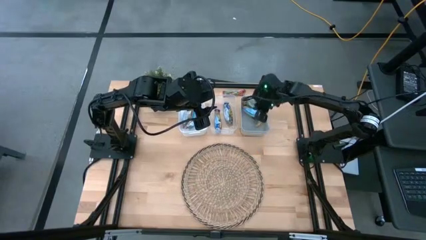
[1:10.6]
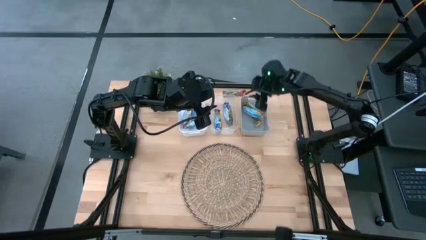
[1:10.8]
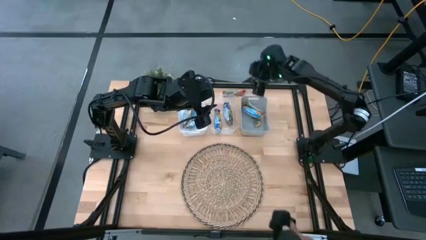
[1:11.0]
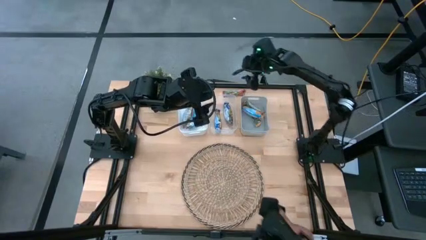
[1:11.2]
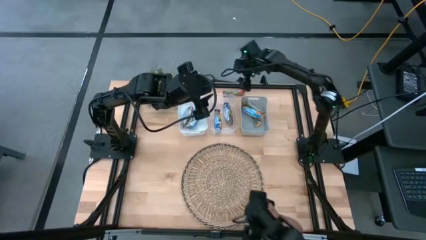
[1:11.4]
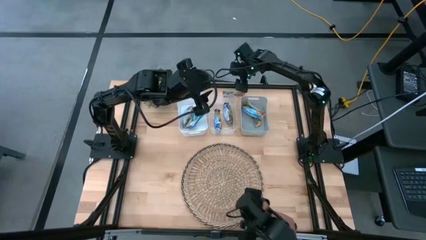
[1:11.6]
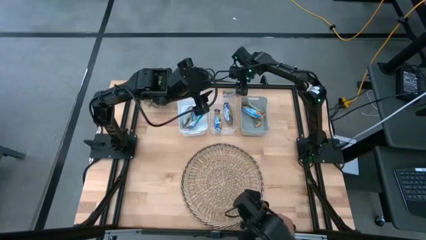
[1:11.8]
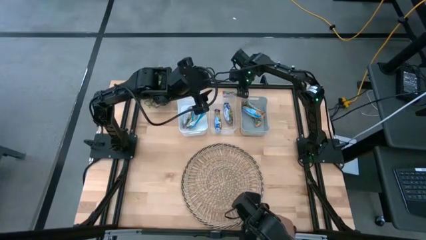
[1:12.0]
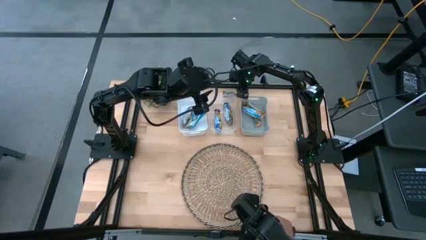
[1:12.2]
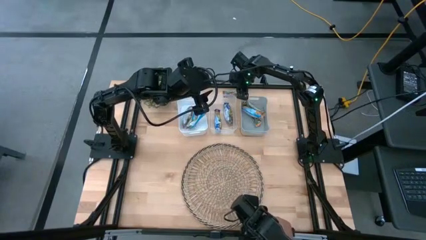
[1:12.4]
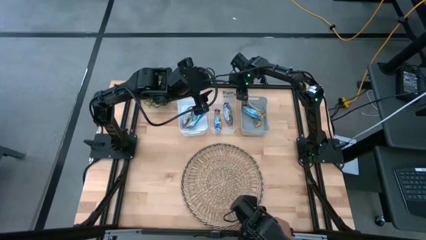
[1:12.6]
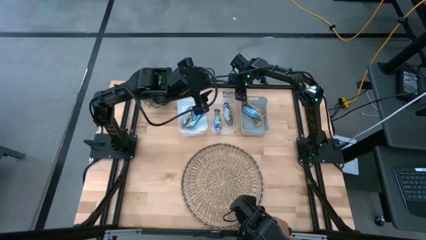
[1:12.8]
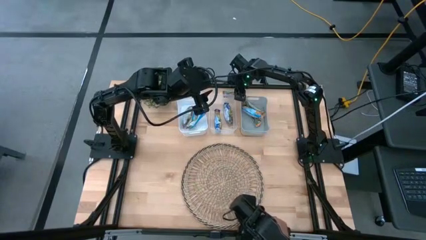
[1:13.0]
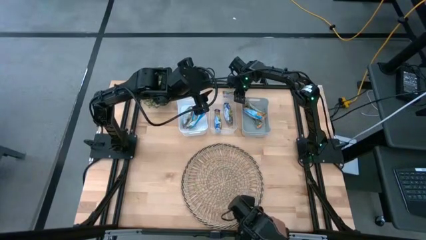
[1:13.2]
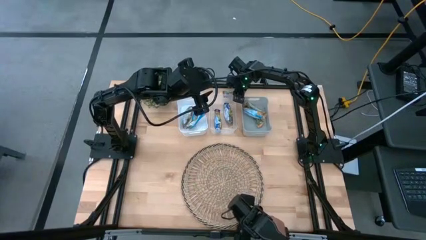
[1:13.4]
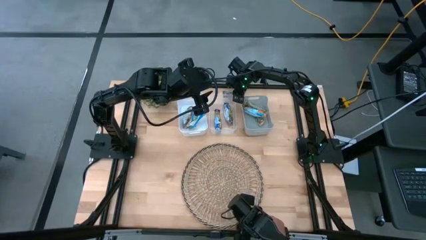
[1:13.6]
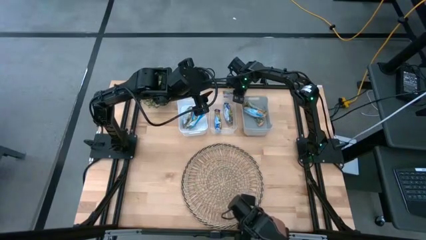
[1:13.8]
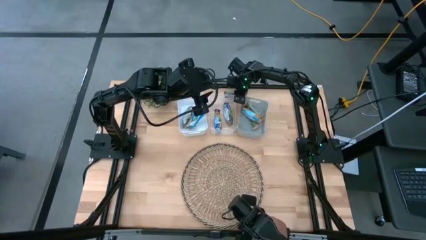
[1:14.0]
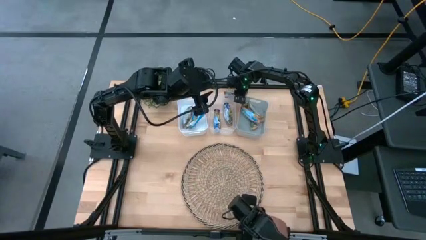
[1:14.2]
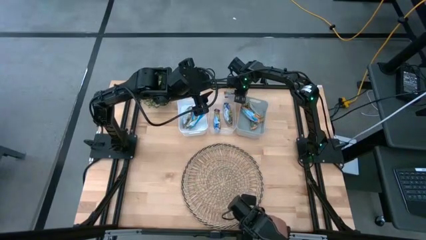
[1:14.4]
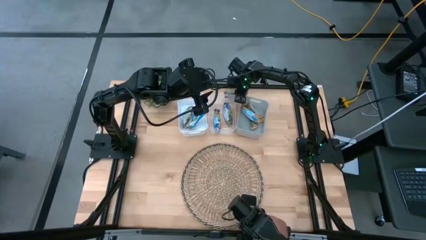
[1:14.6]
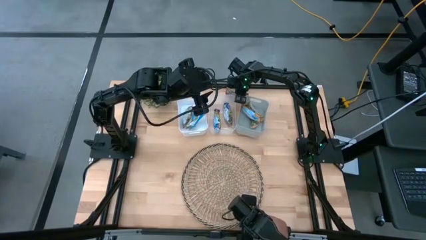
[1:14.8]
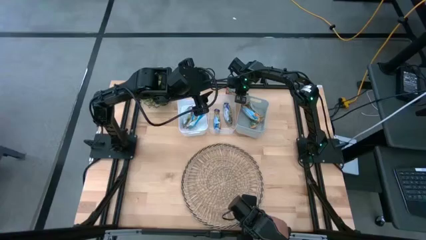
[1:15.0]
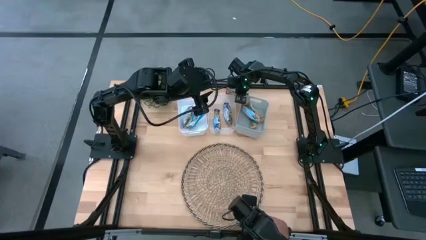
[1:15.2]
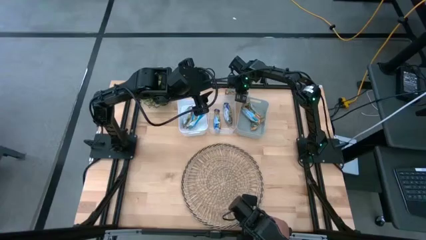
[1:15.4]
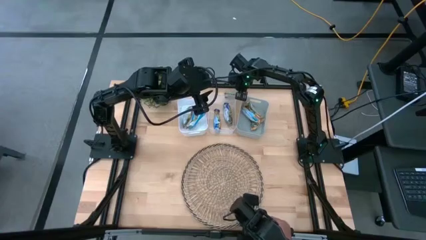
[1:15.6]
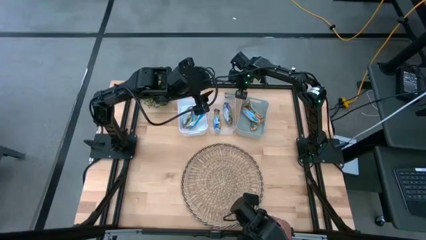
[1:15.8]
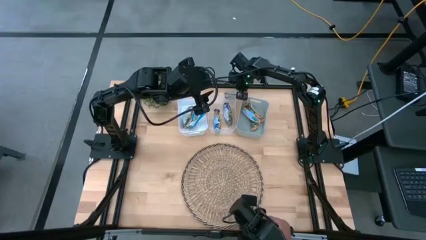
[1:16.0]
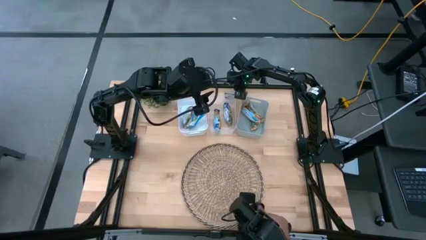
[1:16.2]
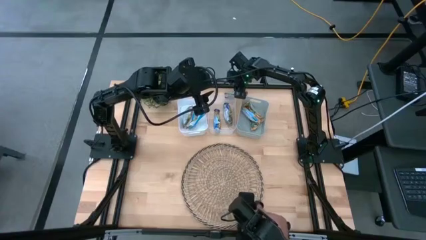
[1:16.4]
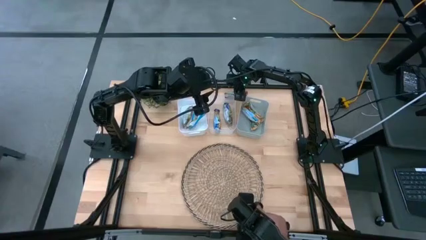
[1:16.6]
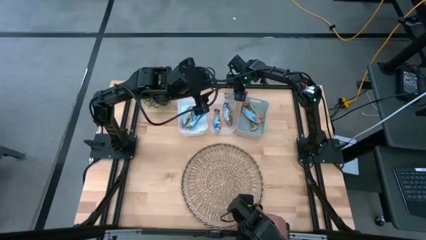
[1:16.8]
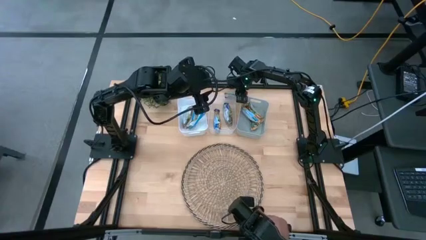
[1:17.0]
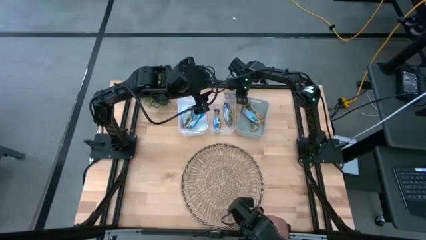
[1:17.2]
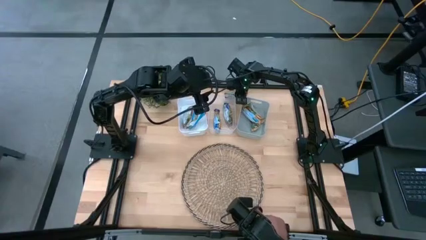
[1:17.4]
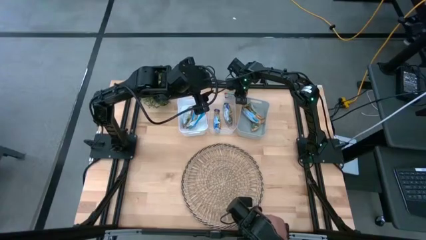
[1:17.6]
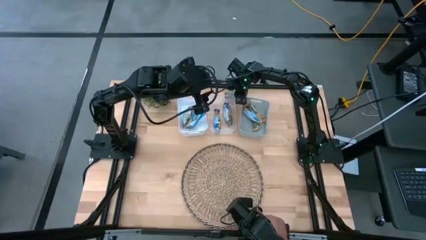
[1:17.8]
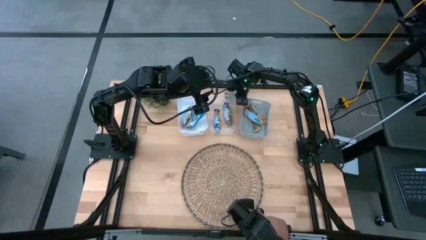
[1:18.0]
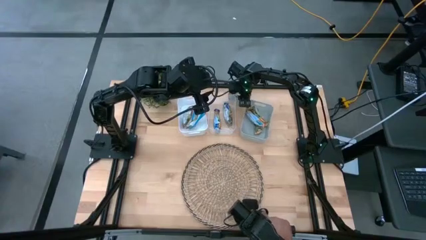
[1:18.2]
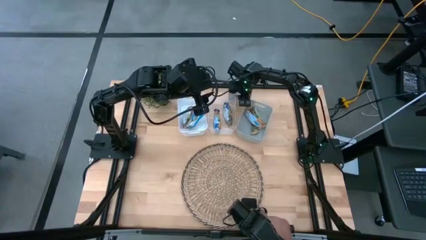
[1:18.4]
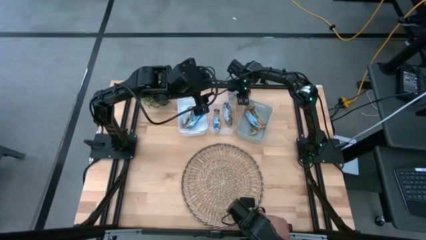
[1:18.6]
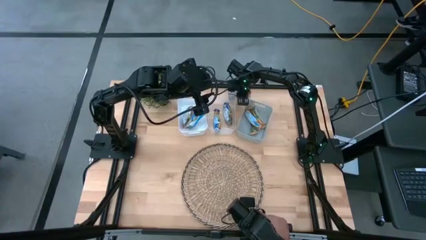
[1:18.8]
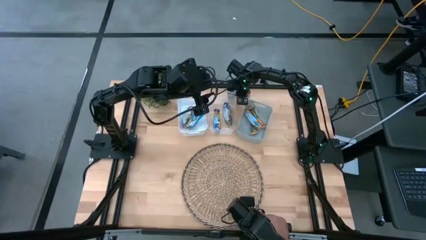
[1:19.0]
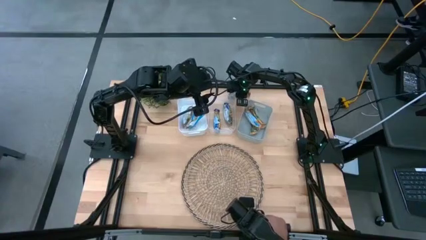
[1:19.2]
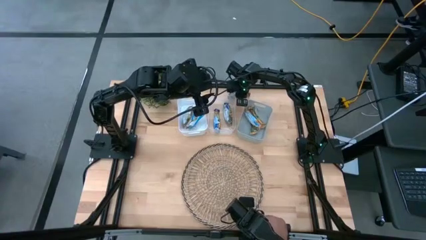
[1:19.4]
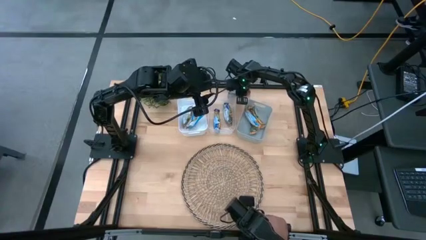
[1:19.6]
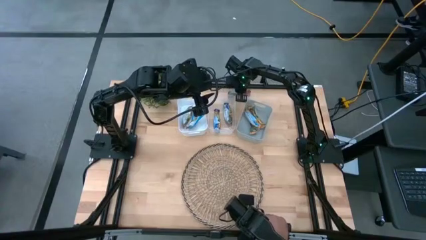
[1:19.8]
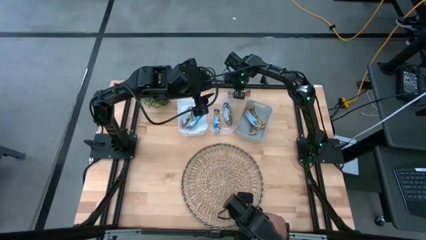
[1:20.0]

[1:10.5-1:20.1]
Task: Pick and place Granola Bars by type
Put the red granola bar into the white bin

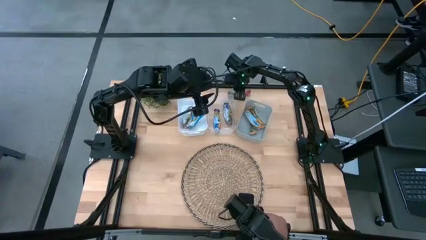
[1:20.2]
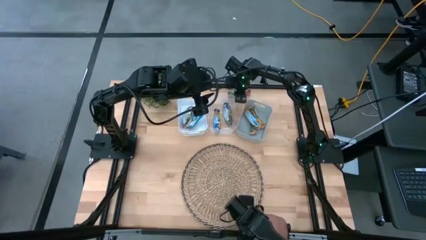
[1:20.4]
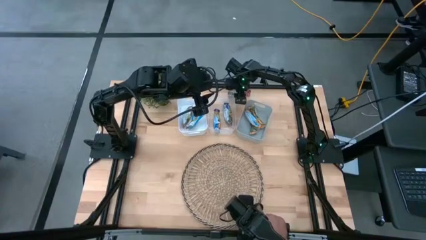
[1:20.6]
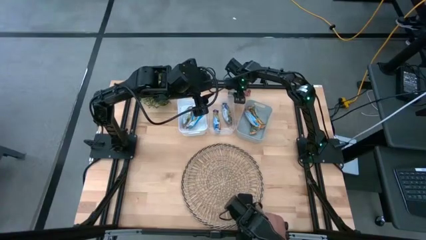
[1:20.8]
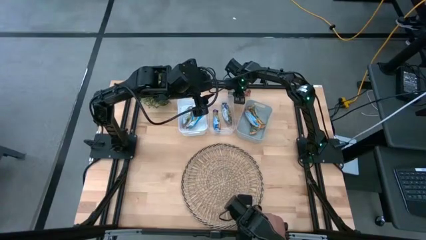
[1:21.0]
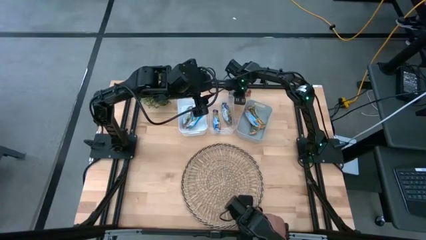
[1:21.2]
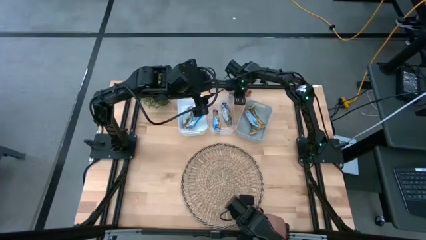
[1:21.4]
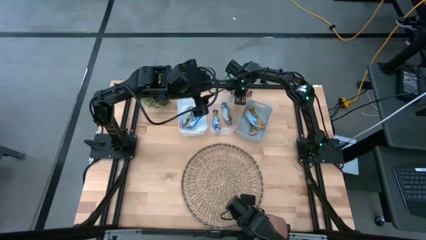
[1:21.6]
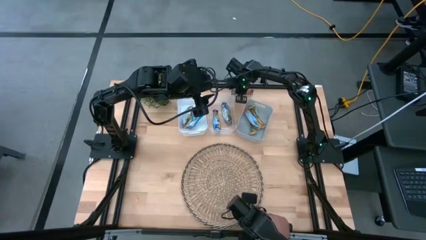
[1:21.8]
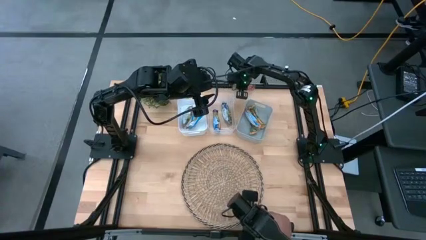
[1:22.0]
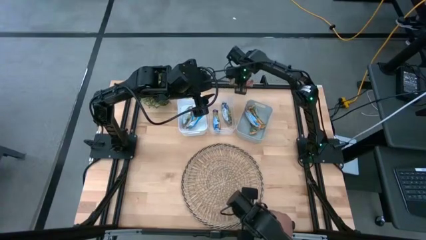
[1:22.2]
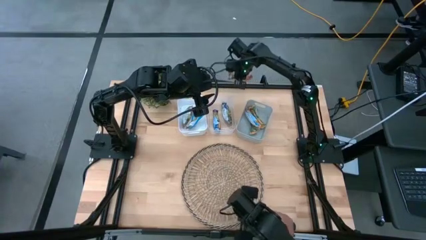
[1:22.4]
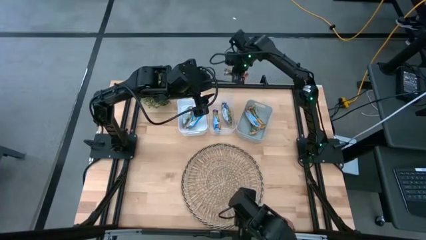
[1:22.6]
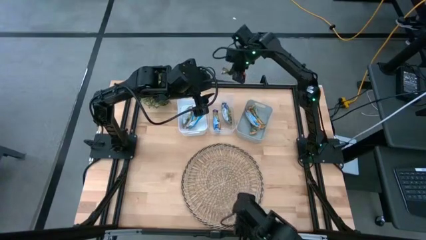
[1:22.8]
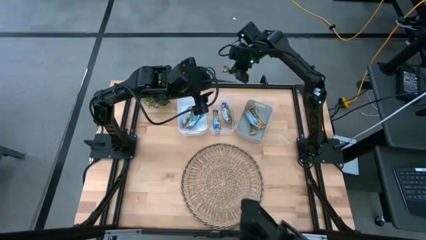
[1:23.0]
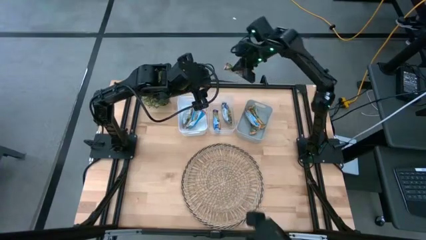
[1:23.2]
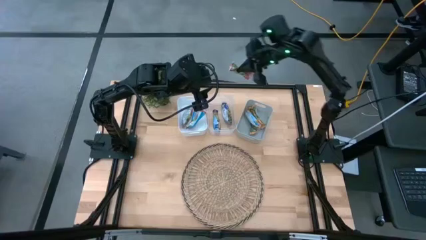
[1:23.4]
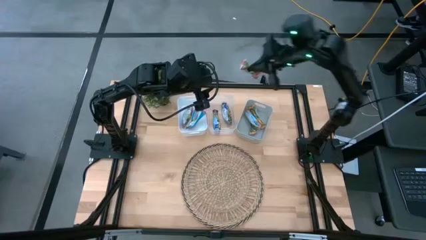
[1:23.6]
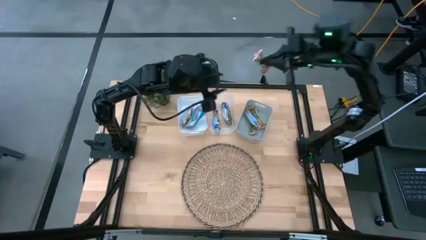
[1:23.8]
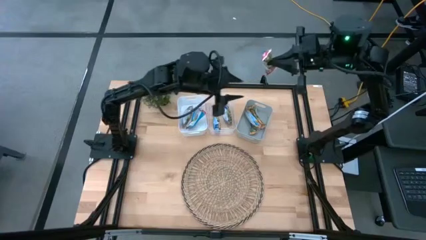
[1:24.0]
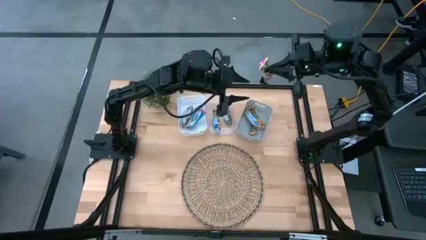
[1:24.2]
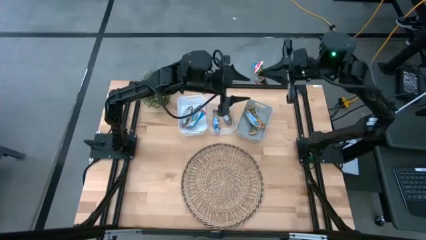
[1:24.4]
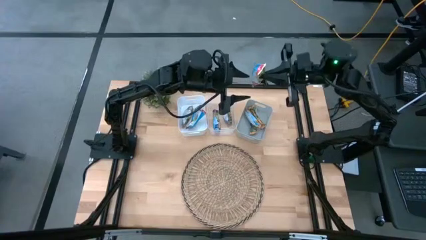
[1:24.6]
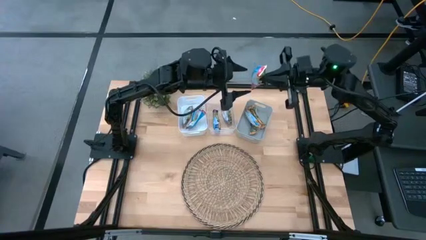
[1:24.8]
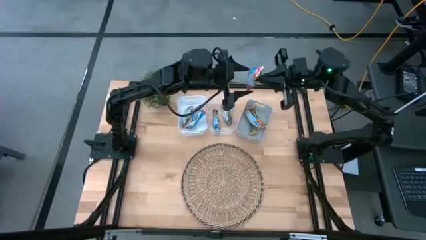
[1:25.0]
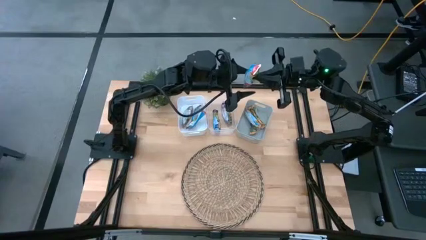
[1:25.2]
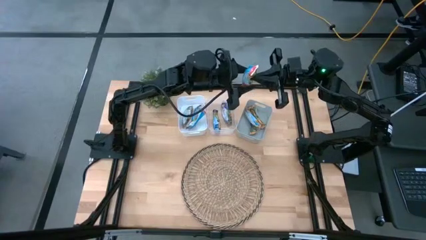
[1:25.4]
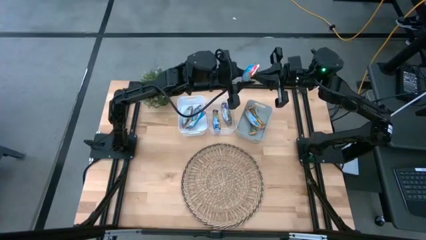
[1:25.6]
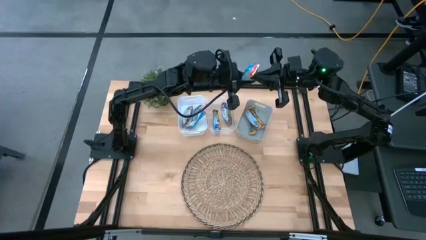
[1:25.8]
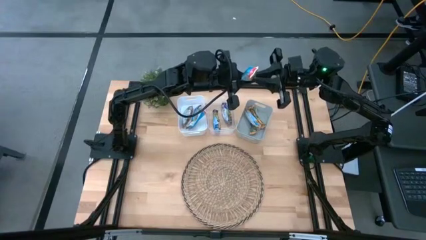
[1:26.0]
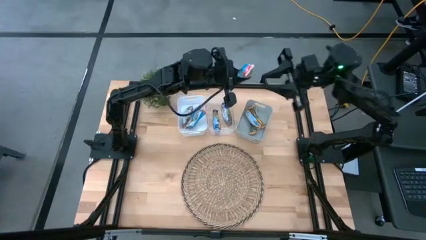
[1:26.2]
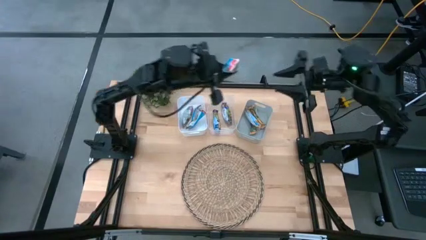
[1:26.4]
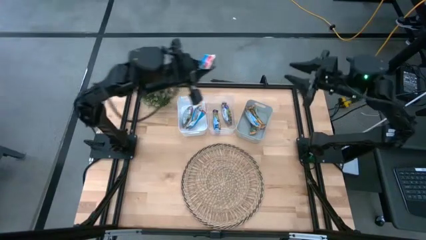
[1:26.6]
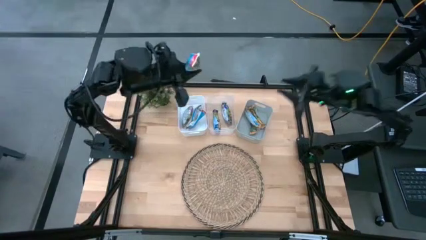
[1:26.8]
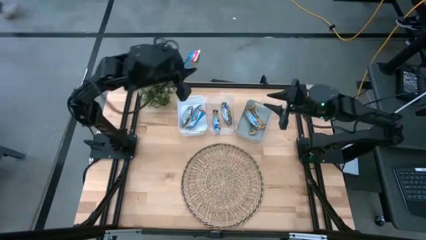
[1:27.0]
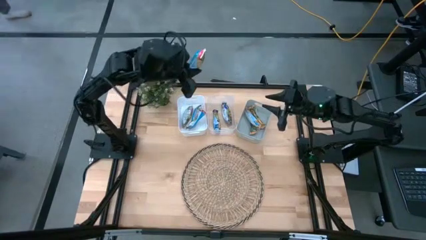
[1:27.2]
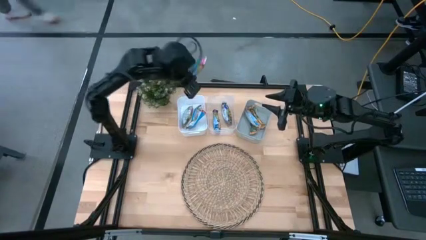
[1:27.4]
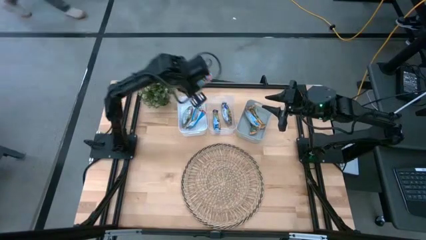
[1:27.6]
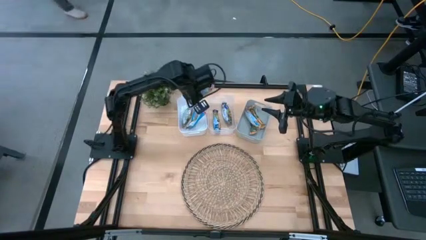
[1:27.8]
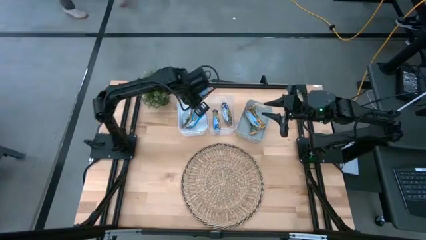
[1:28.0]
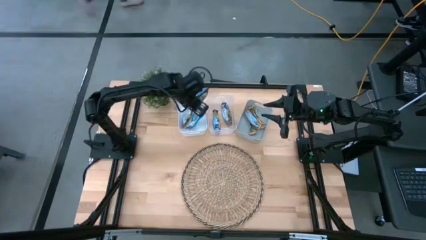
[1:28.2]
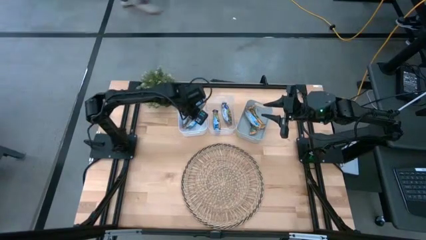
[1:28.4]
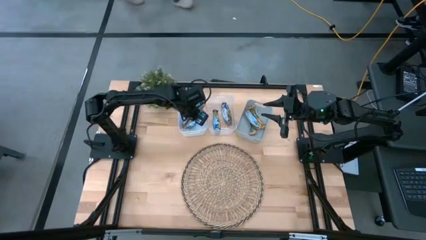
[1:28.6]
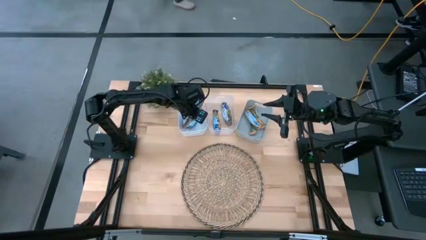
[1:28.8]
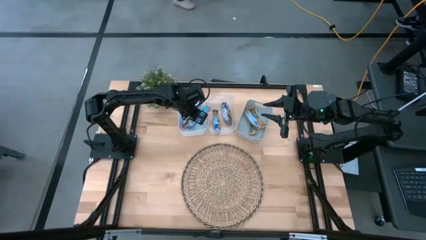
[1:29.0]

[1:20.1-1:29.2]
Put the red granola bar into the white bin
